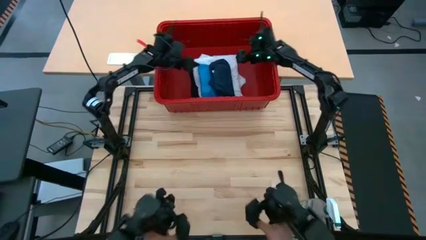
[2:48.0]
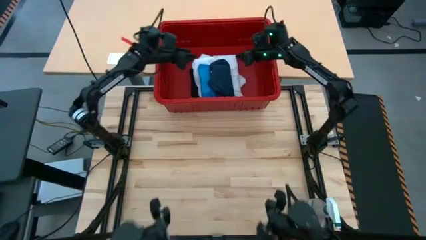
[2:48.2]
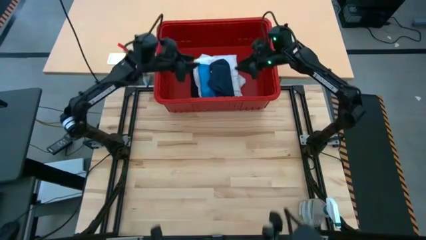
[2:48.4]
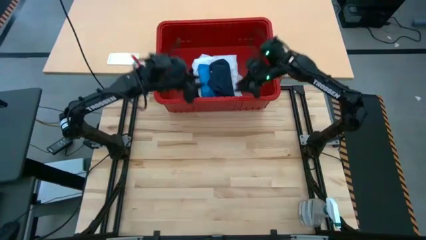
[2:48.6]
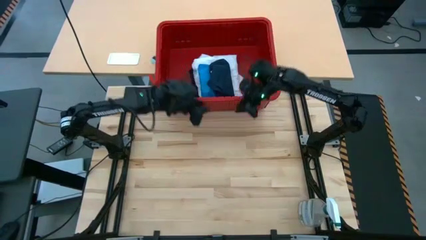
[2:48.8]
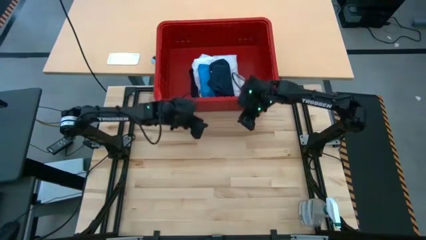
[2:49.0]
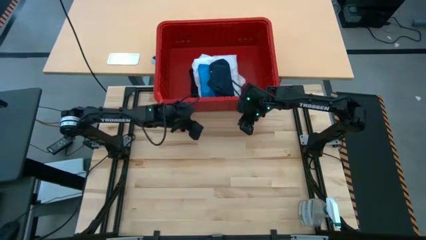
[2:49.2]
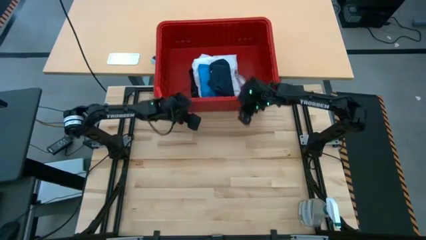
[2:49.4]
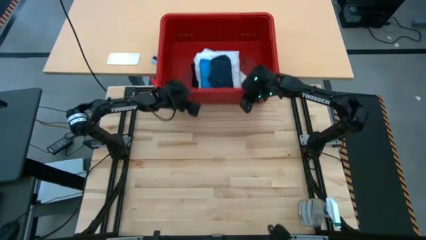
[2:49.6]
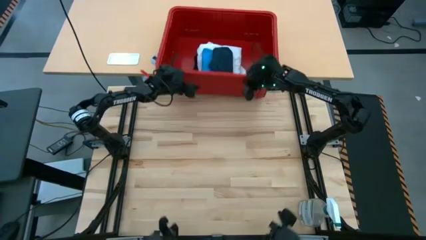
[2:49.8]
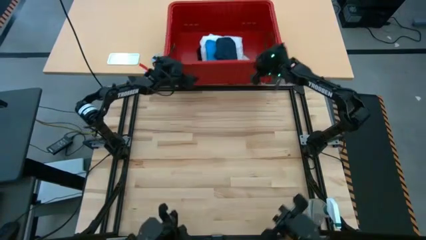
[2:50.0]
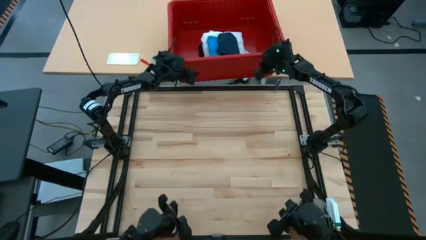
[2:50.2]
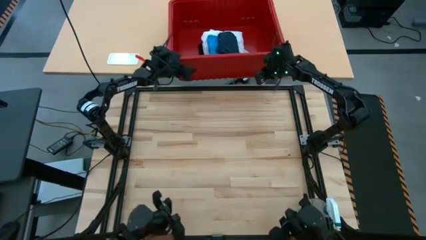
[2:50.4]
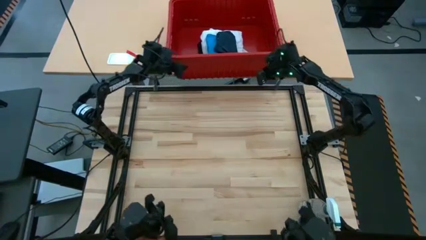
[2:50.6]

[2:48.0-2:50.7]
Task: Fold laundry
Adjust the bin

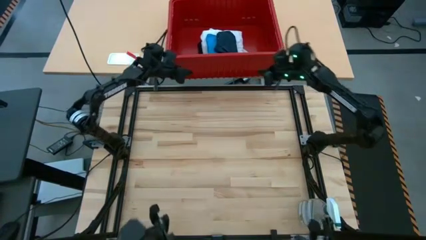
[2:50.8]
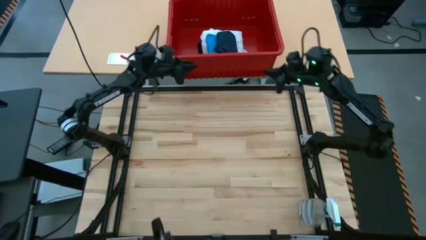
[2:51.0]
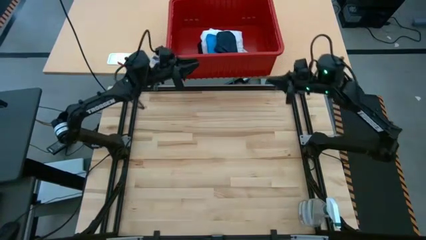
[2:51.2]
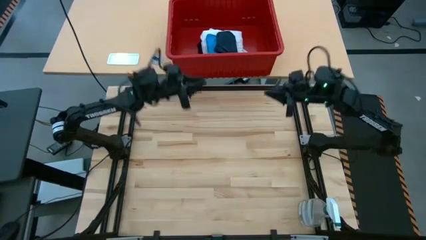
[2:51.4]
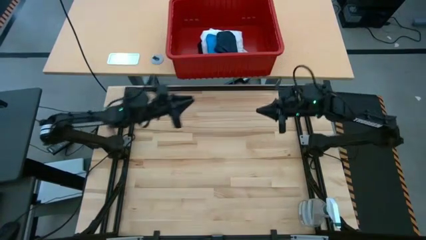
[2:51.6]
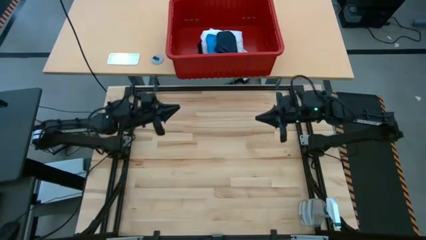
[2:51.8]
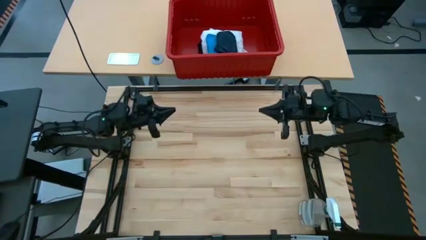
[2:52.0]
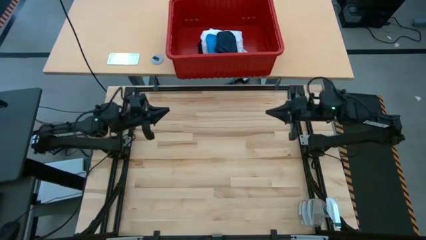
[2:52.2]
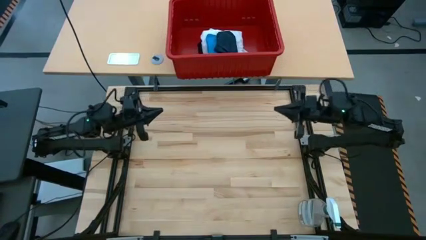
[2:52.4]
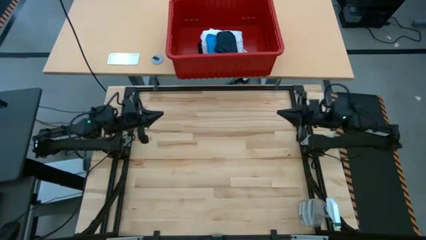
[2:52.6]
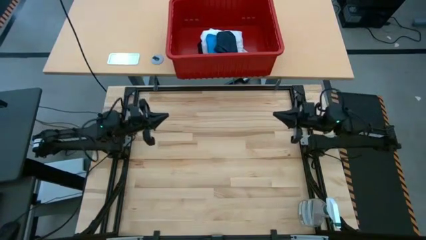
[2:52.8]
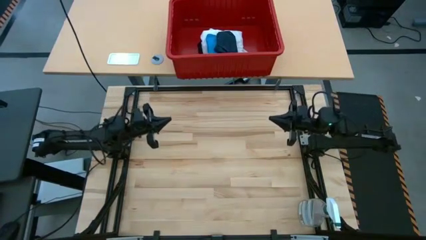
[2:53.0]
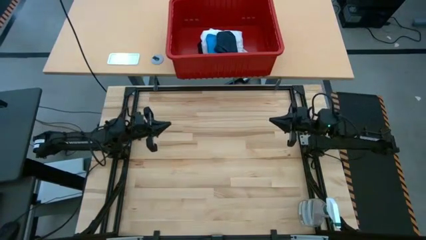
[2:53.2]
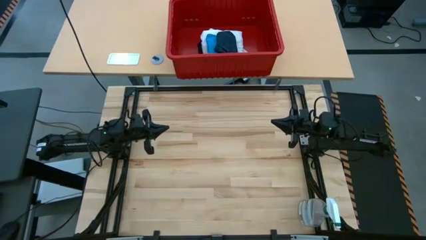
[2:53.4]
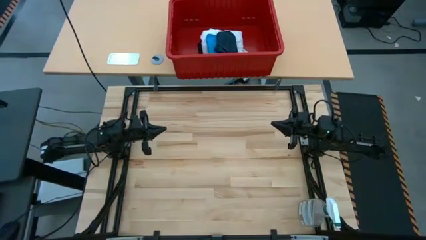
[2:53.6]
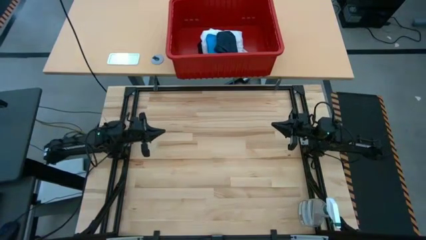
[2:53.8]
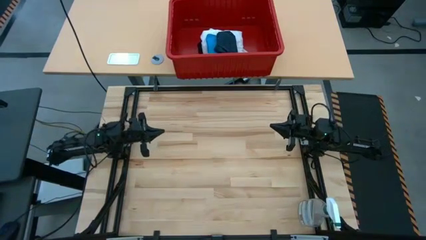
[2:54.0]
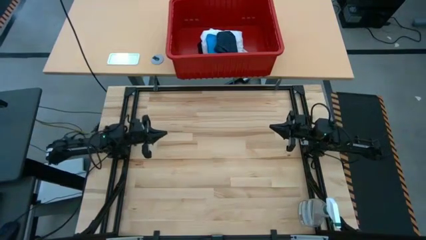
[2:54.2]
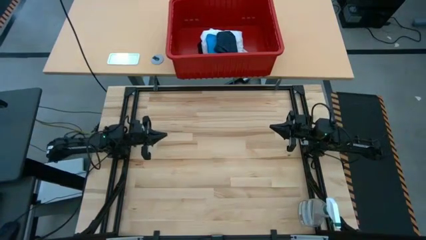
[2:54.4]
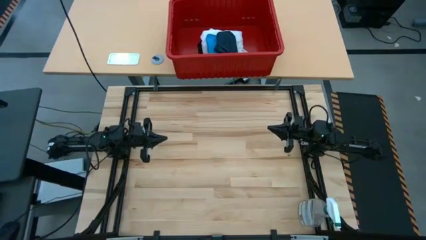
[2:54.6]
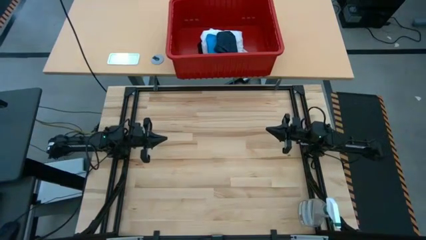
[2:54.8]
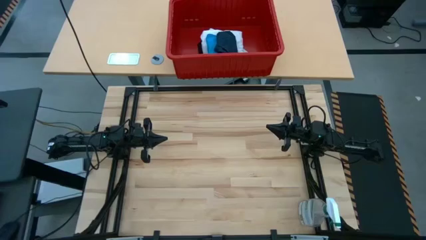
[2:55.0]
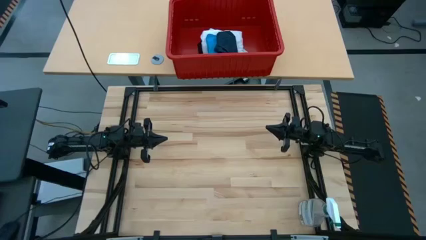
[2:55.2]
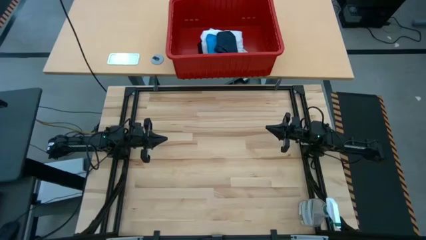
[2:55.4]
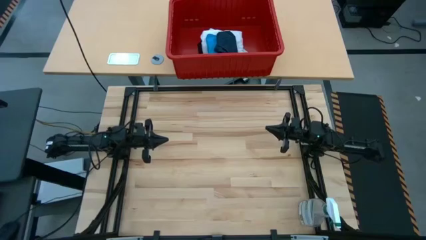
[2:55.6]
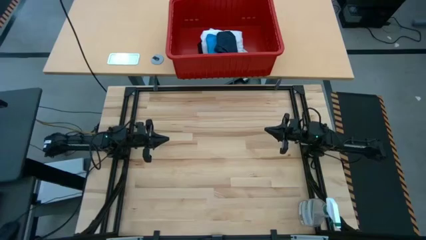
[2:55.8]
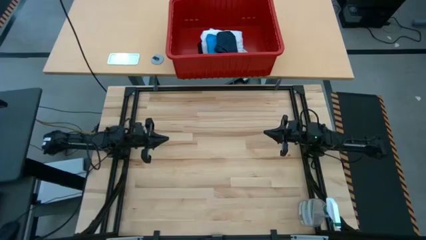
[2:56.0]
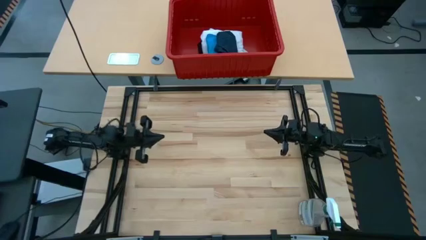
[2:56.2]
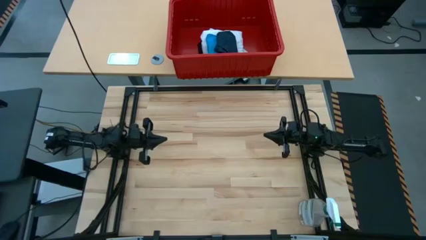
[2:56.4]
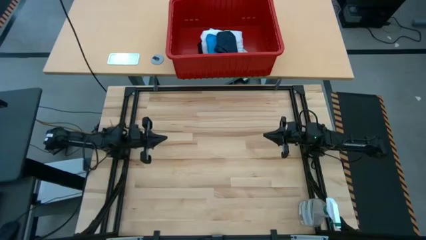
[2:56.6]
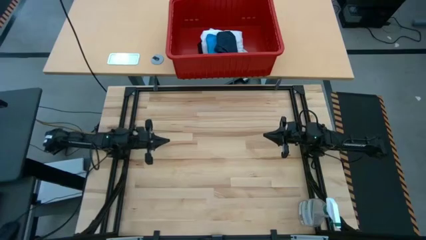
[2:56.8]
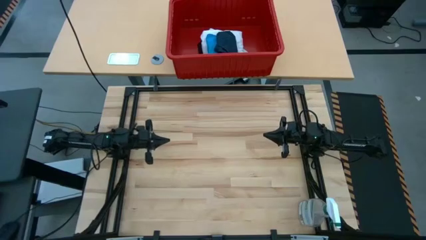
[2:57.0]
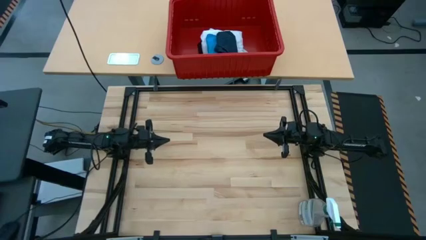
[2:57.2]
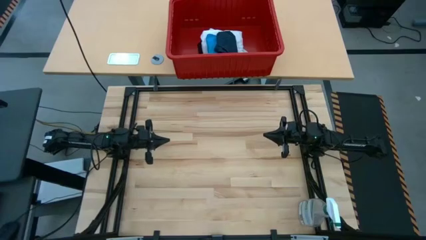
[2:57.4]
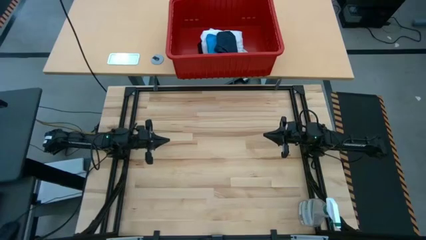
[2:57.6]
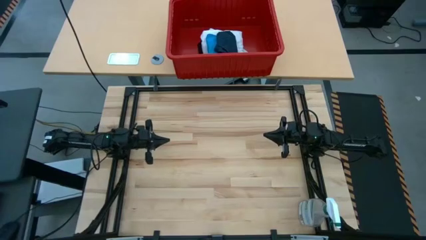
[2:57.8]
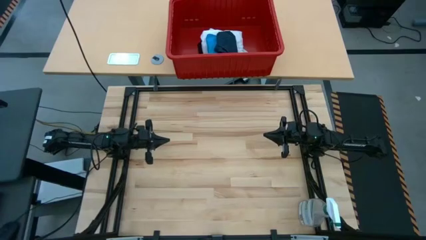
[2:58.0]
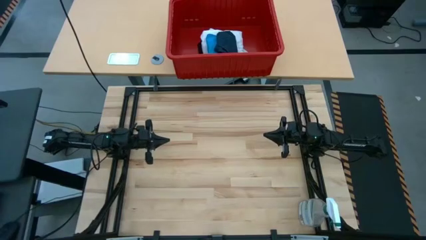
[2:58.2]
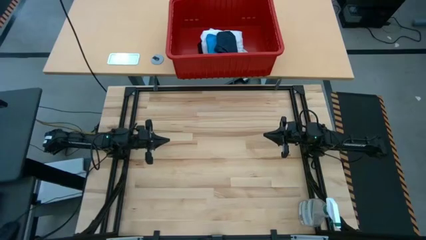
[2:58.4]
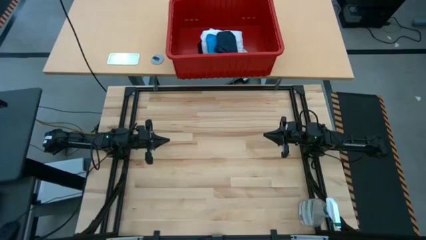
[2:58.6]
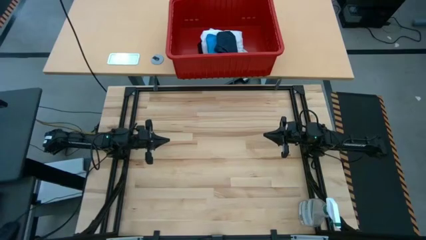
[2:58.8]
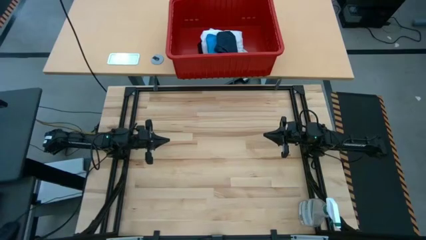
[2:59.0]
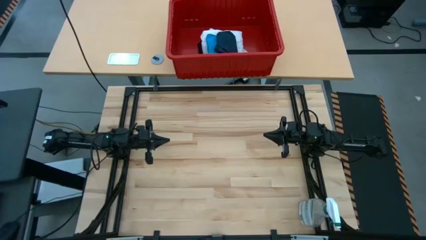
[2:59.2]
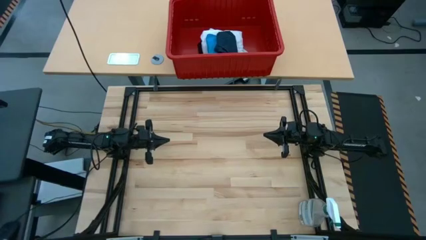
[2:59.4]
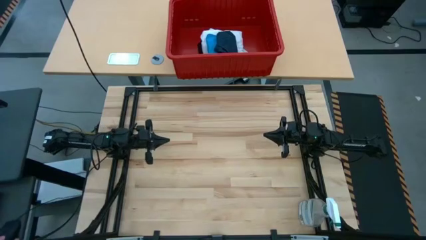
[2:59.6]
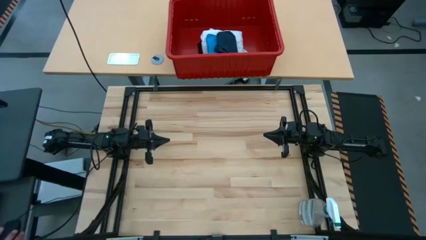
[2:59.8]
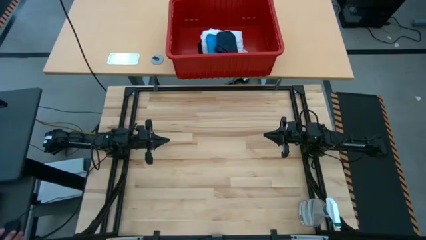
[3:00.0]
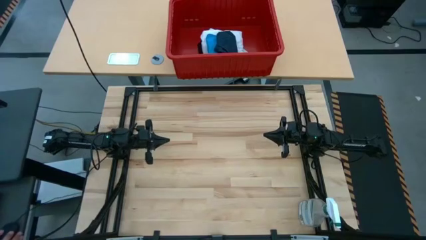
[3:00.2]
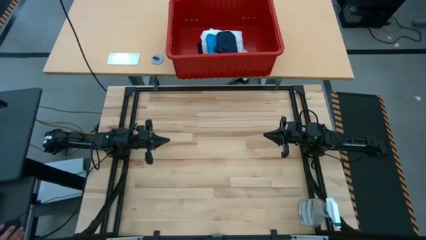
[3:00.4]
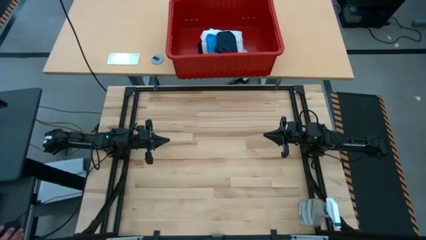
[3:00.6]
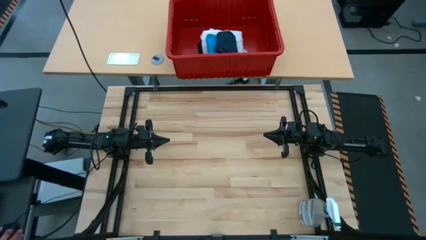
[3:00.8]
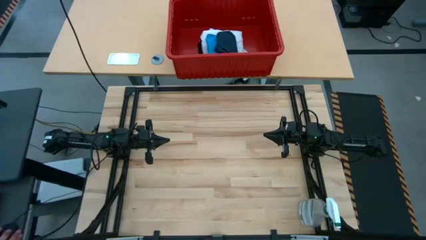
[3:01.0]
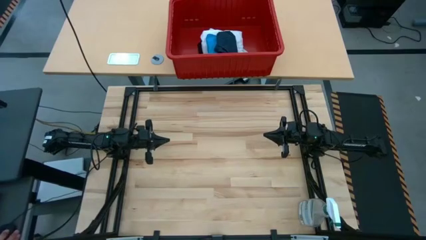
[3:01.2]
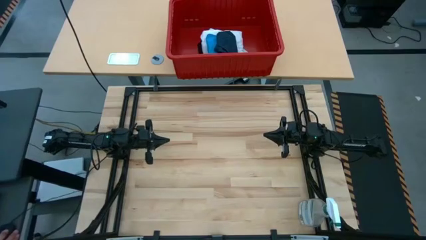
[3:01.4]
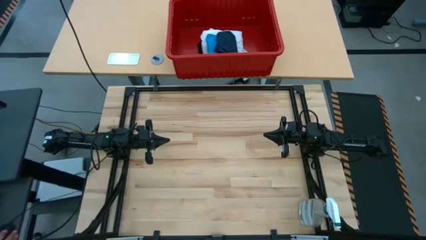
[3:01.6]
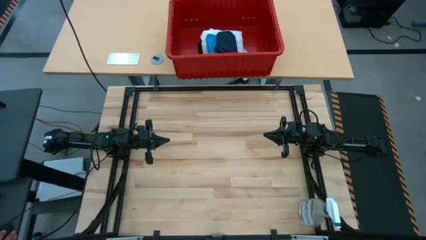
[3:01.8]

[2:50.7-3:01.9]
Return to Home Position

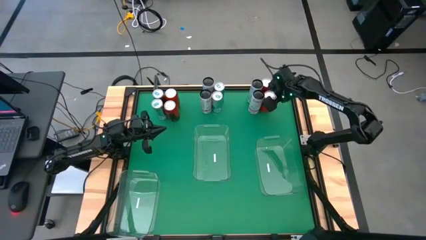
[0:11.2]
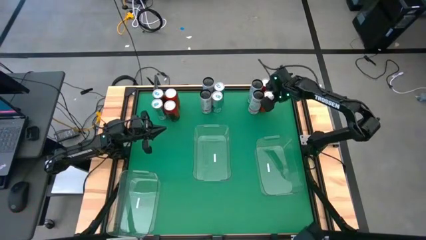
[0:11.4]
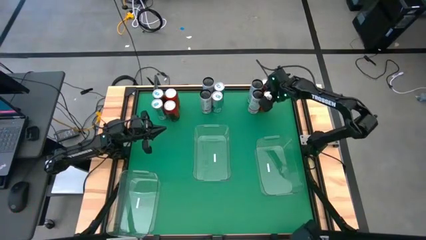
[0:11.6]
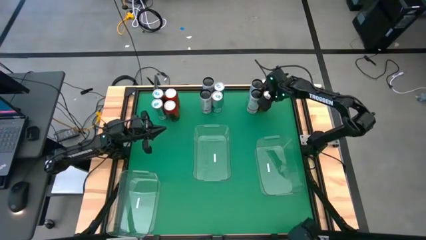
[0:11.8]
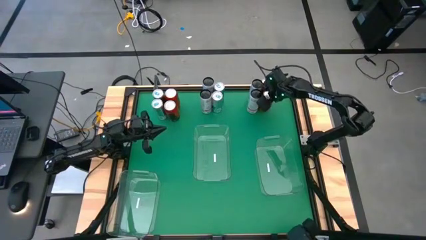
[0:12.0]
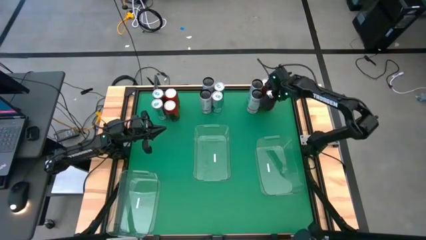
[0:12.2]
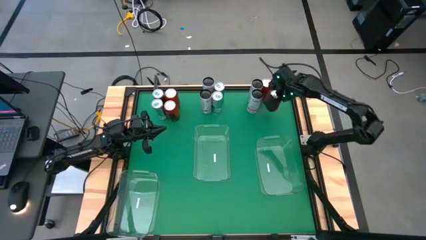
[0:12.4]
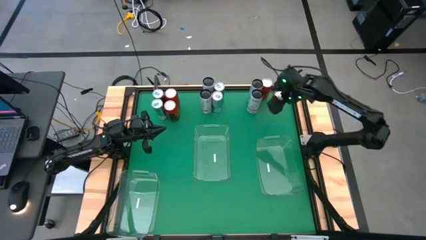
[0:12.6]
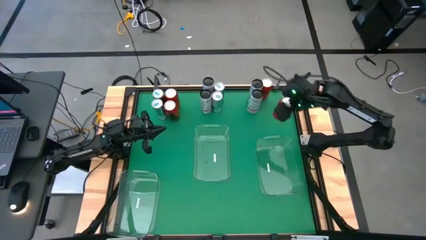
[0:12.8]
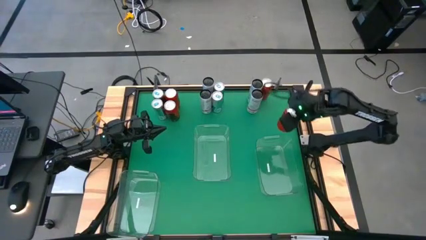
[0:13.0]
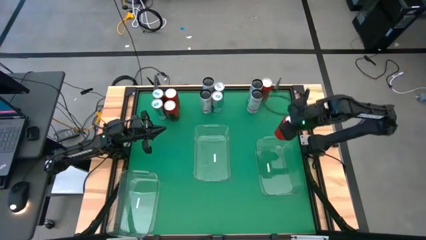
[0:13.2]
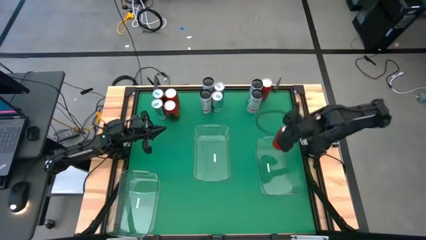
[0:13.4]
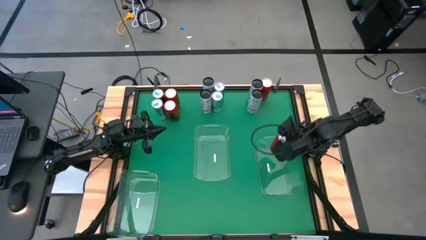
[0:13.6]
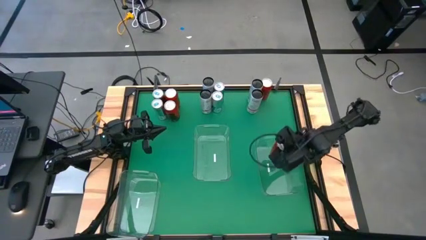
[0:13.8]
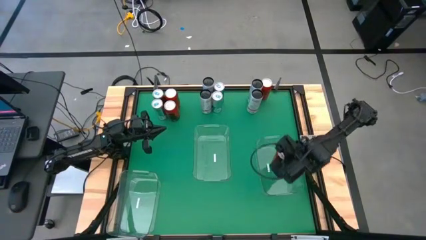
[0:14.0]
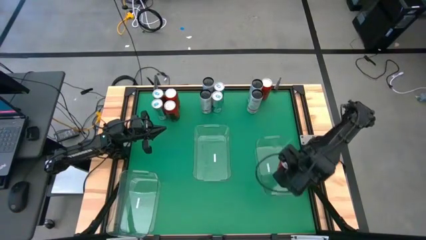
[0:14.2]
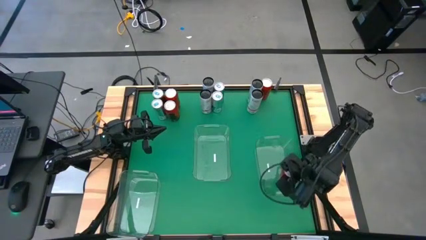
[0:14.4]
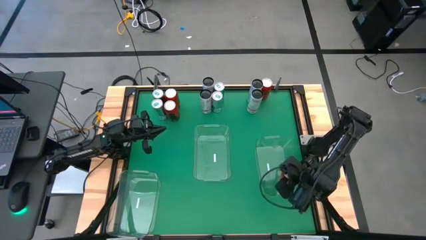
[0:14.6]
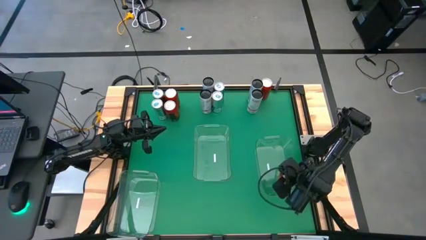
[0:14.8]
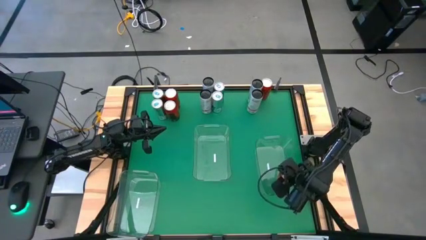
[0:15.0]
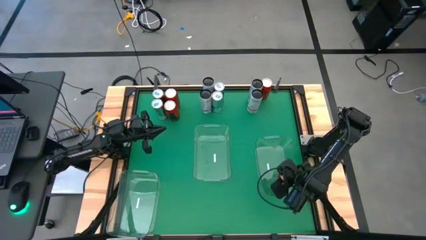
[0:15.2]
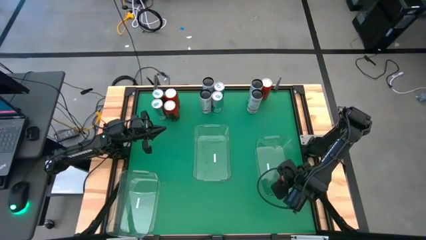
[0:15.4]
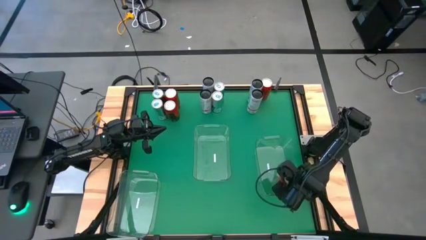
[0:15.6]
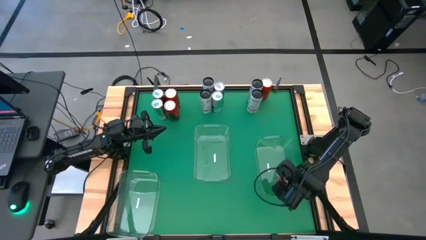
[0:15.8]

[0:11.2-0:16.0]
Task: Sort soda cans
Put the bottom right red-black soda can into the middle right transparent bin
